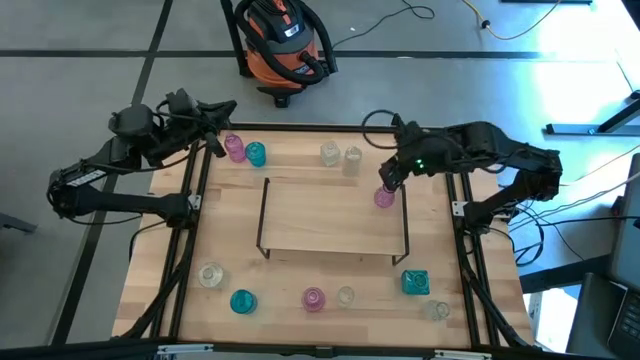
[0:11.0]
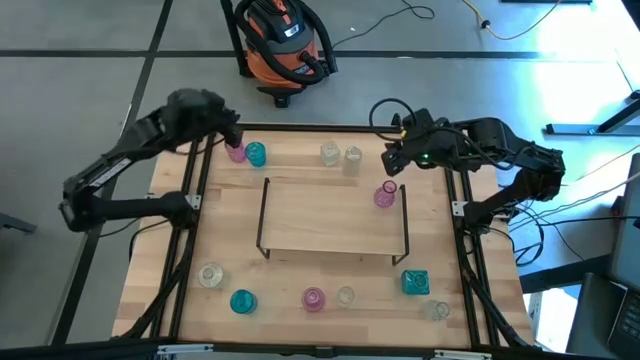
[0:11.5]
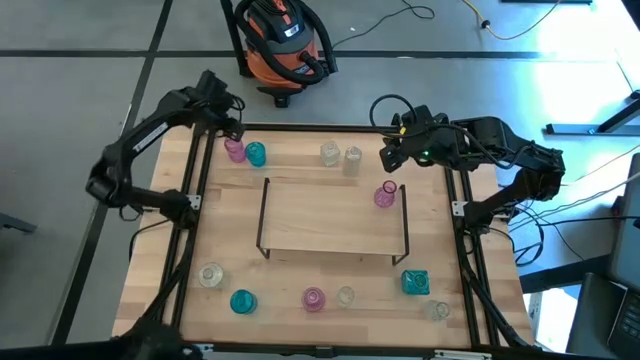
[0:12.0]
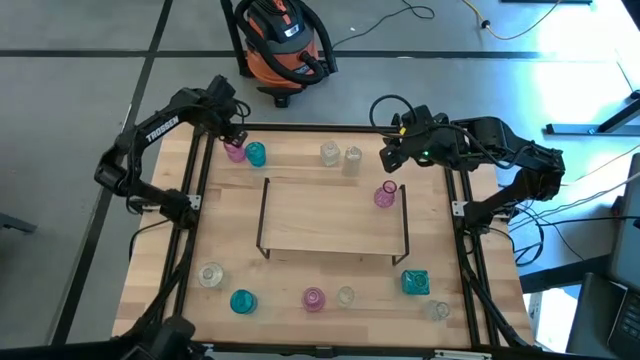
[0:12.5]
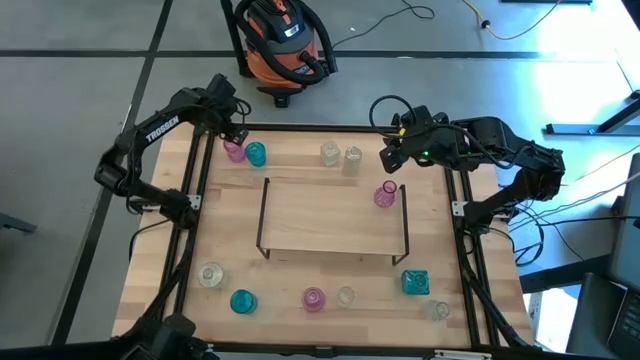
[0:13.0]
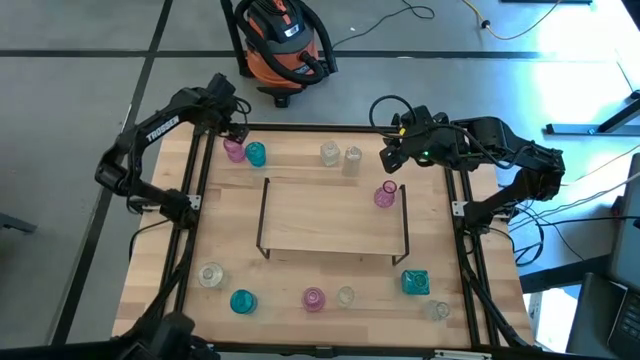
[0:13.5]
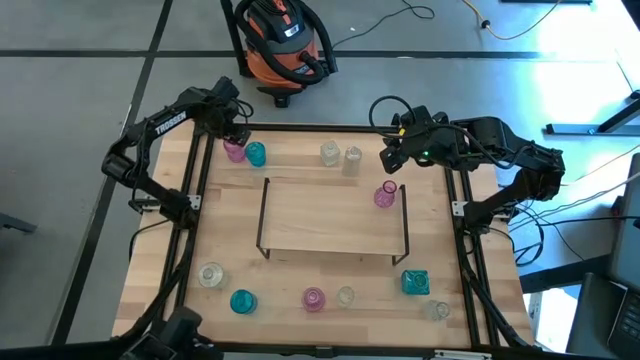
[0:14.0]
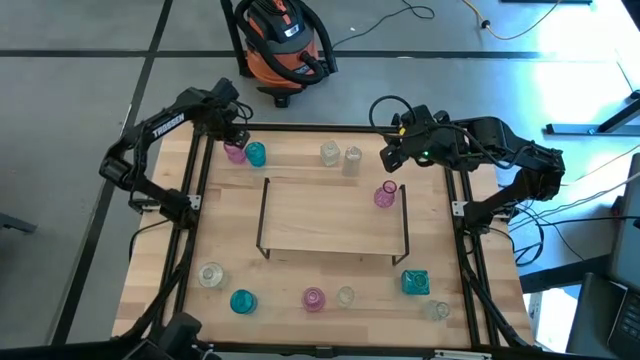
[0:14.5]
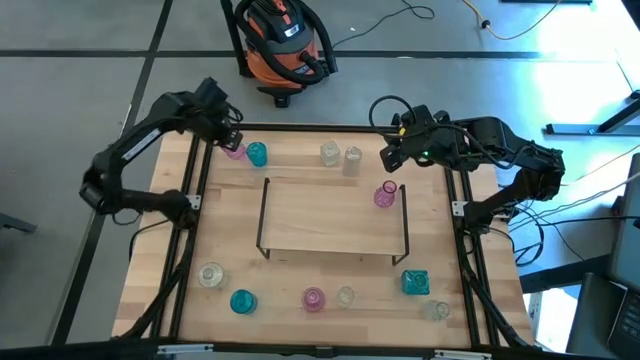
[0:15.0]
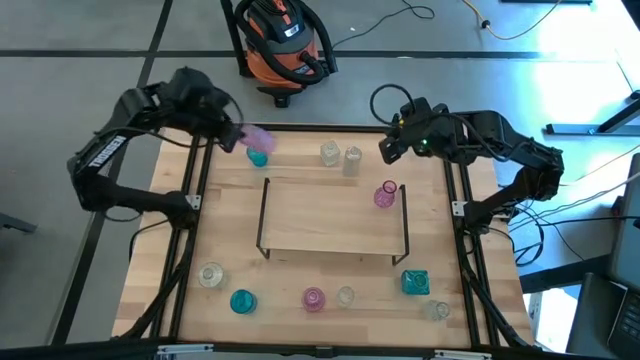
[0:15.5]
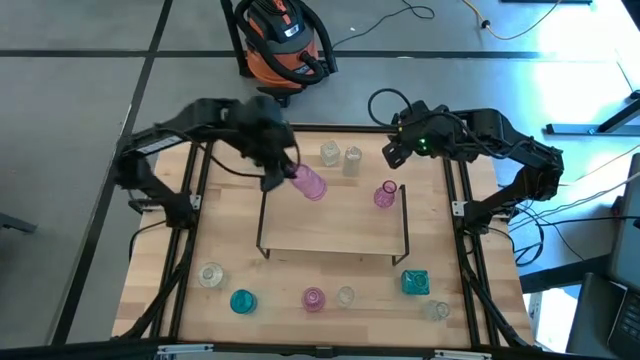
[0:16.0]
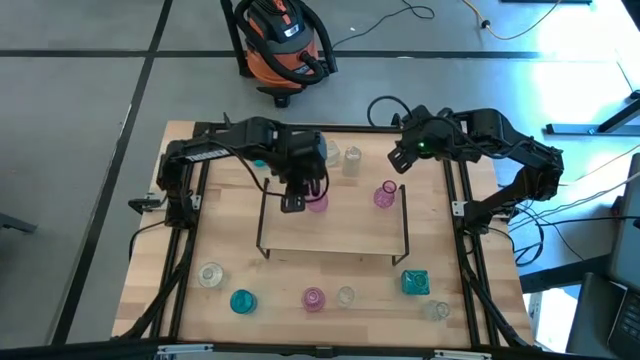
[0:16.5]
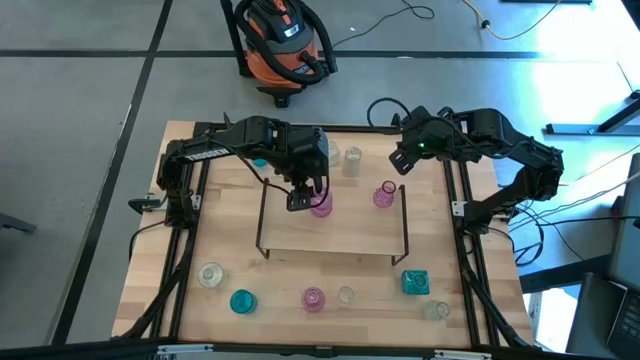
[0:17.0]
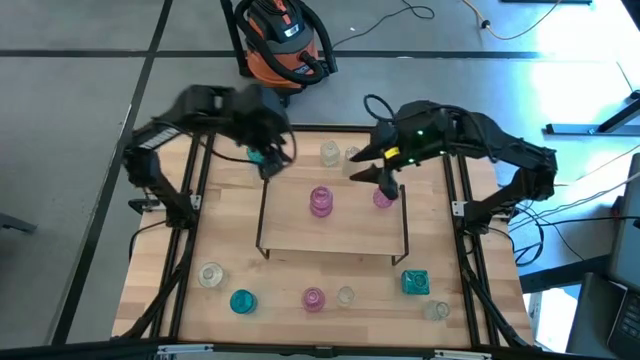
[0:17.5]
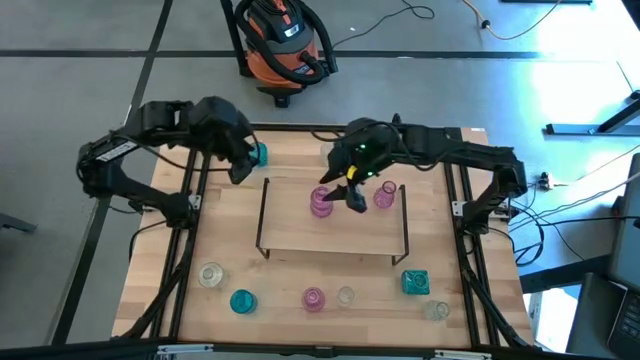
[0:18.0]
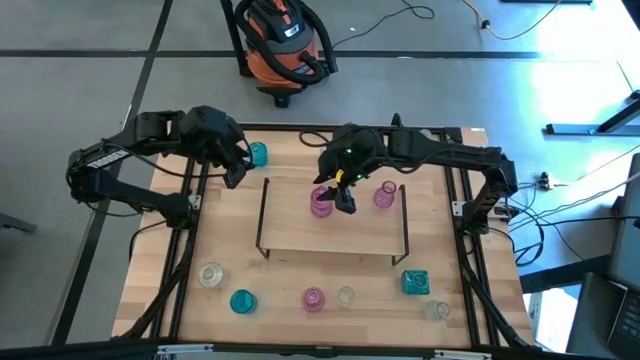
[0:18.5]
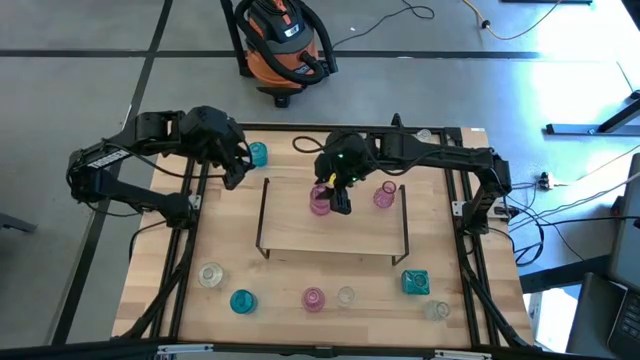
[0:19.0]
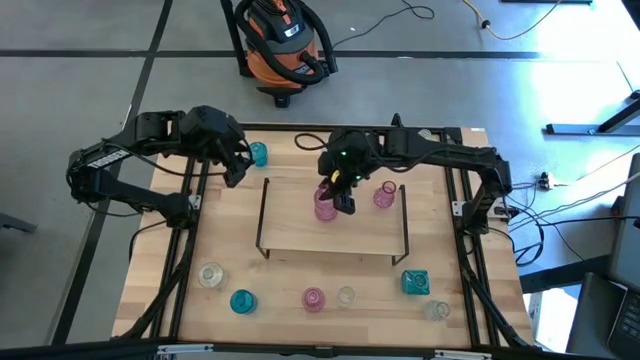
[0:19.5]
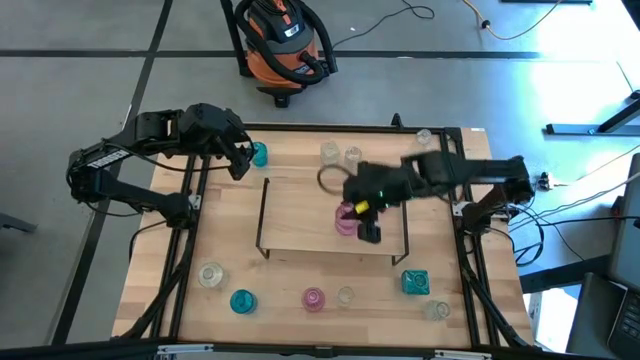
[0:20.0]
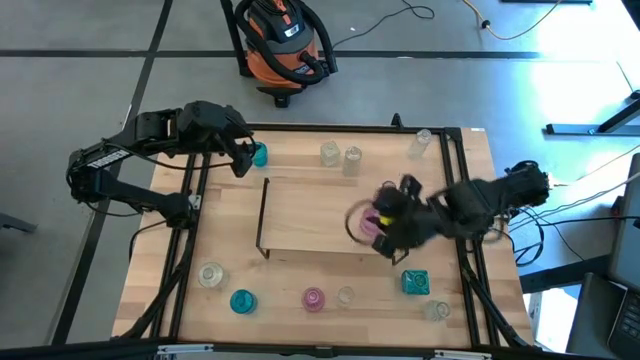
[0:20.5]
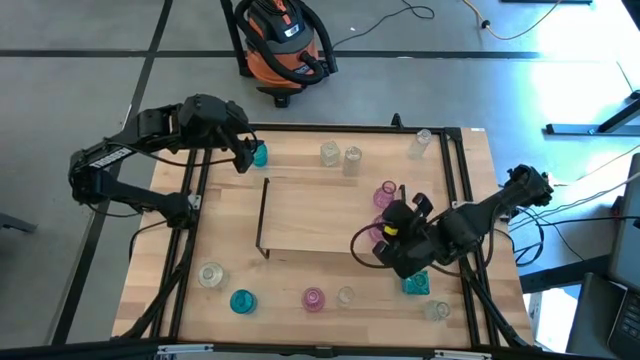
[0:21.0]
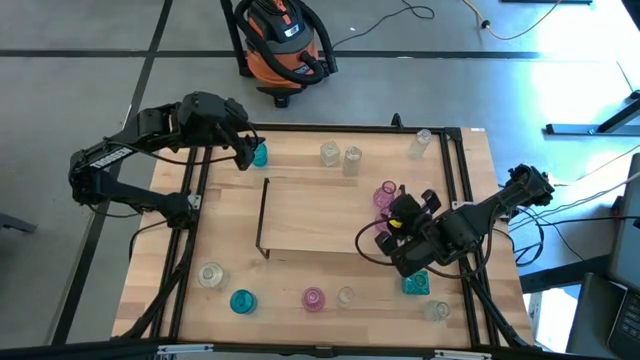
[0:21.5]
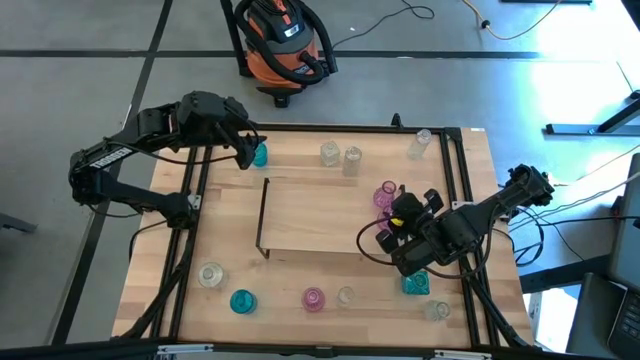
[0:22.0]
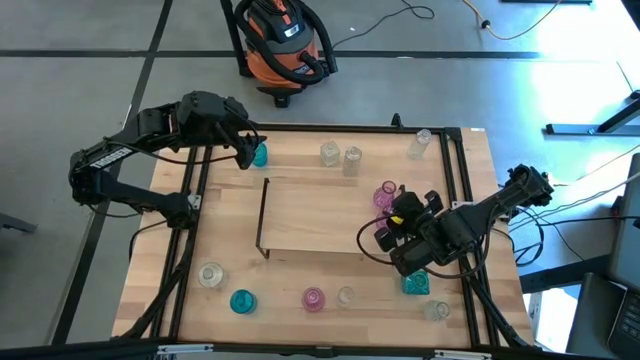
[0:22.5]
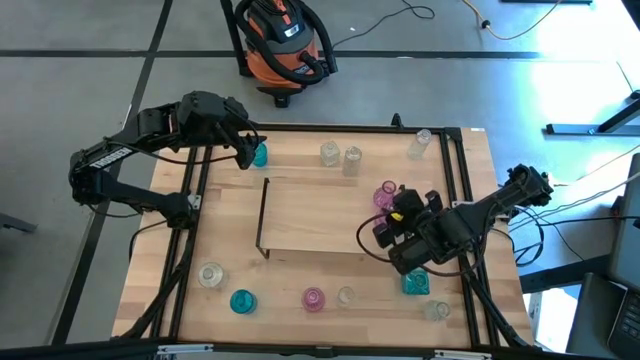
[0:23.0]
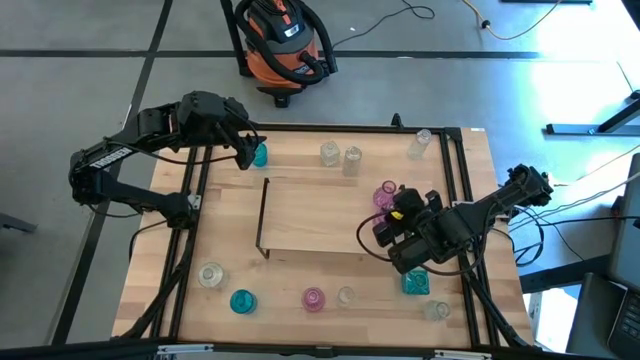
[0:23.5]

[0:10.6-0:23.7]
Task: sort vases onto shelf
Put the top pink vase on the shelf

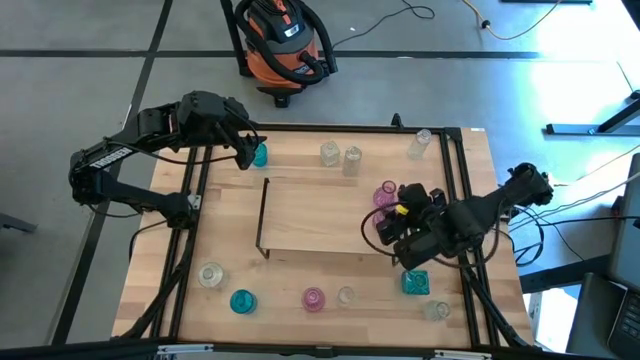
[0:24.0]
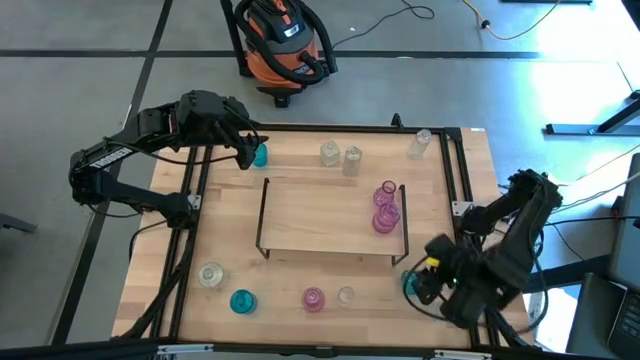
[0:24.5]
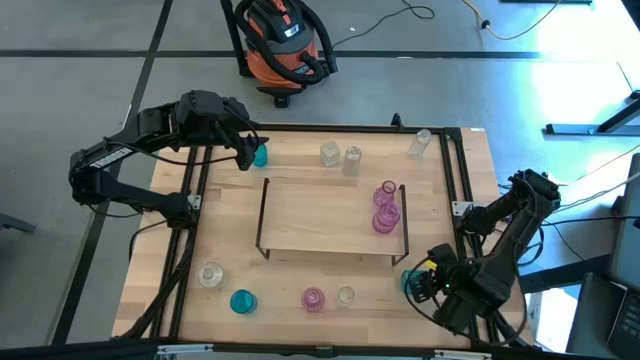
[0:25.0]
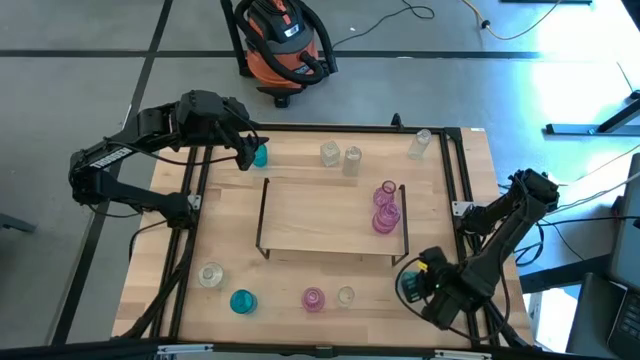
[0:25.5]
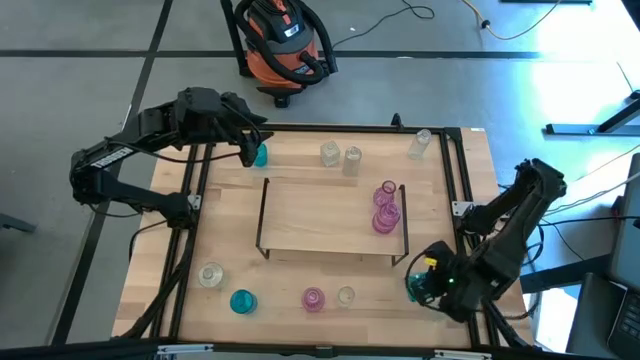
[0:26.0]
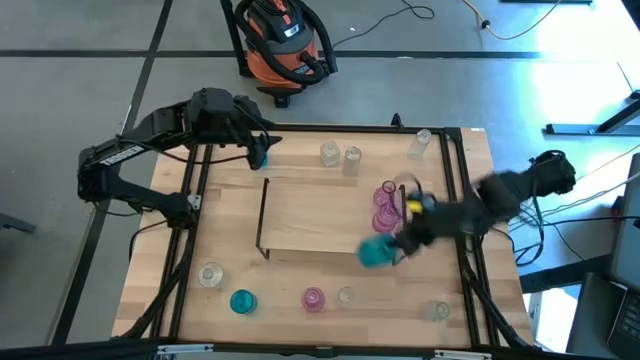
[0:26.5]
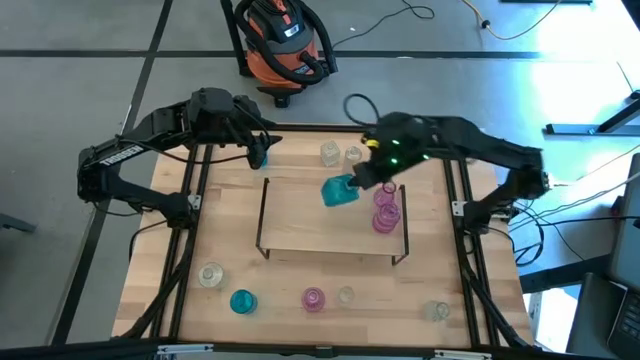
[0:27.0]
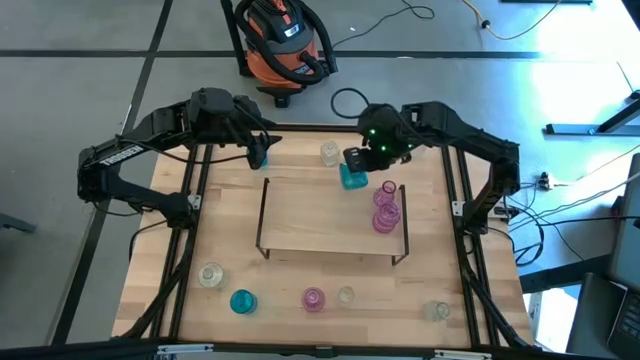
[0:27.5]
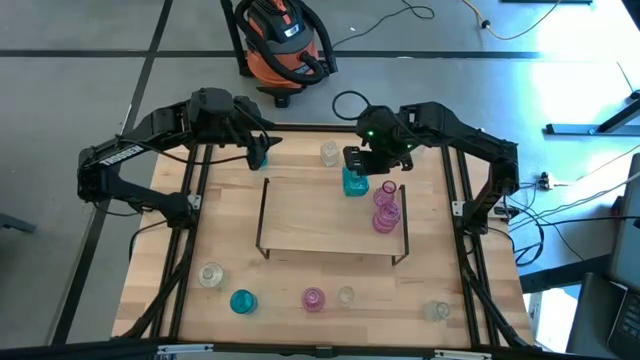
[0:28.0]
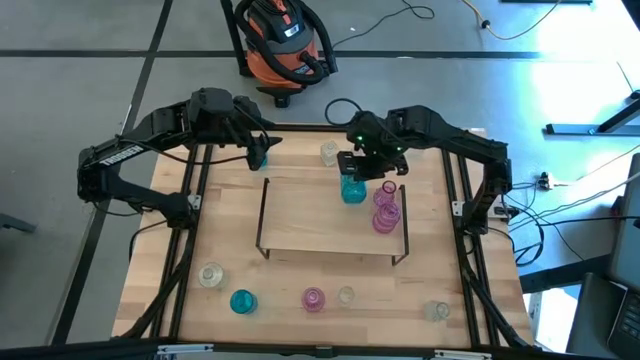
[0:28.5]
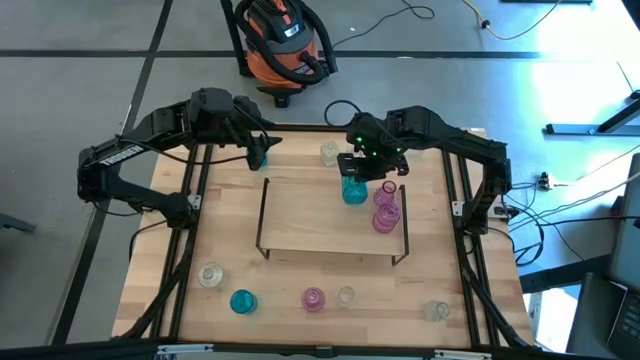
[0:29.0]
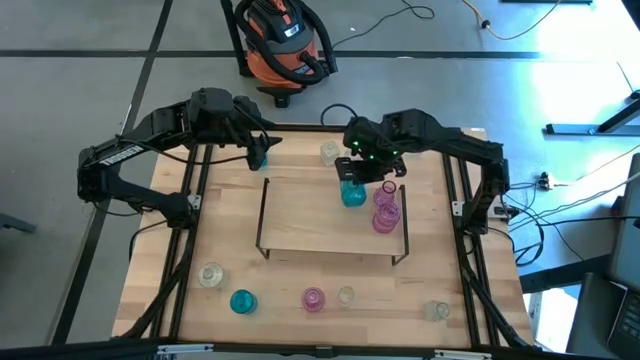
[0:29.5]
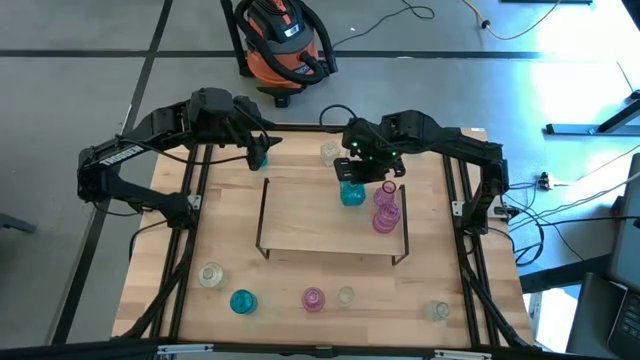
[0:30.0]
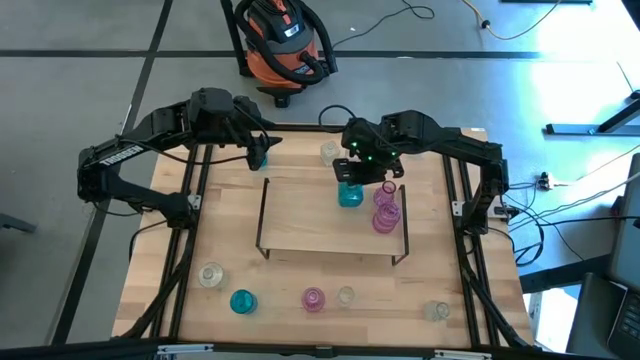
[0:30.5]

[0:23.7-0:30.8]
Put the bottom right blue vase on the shelf

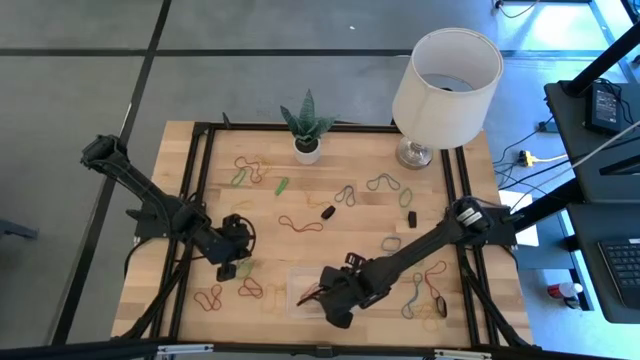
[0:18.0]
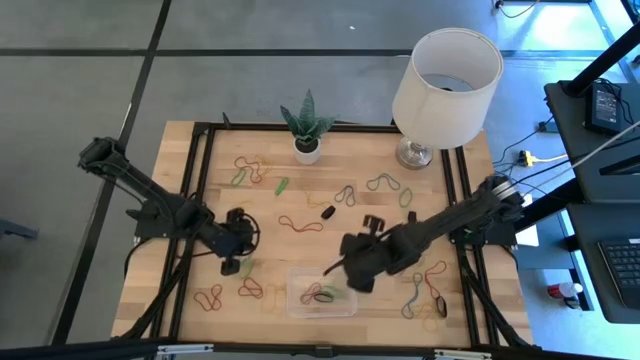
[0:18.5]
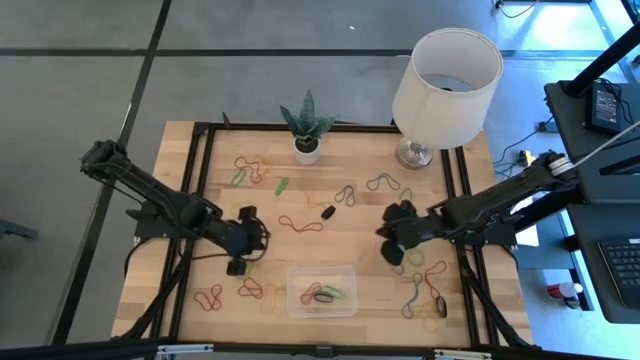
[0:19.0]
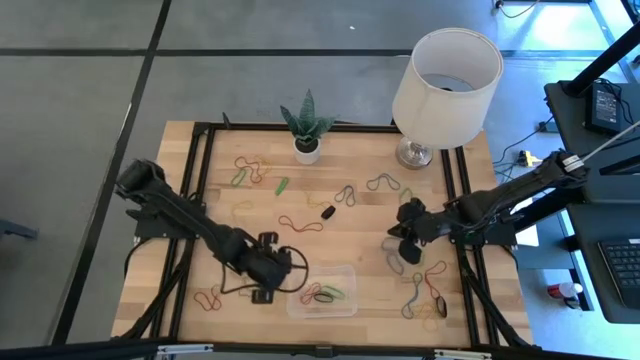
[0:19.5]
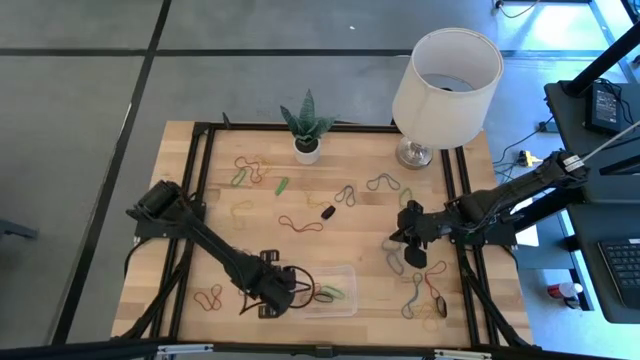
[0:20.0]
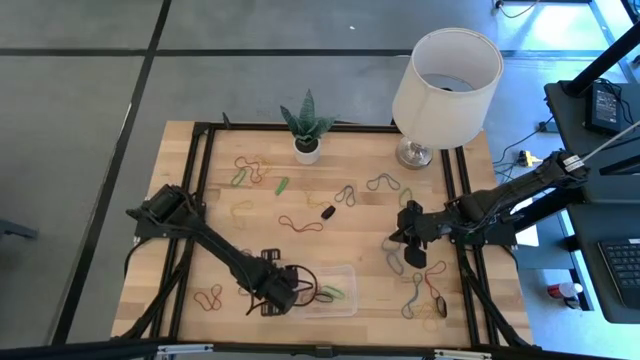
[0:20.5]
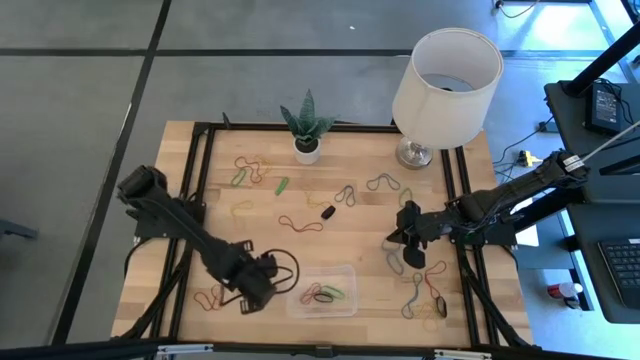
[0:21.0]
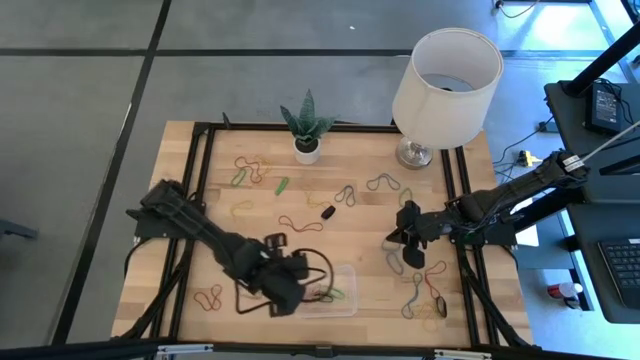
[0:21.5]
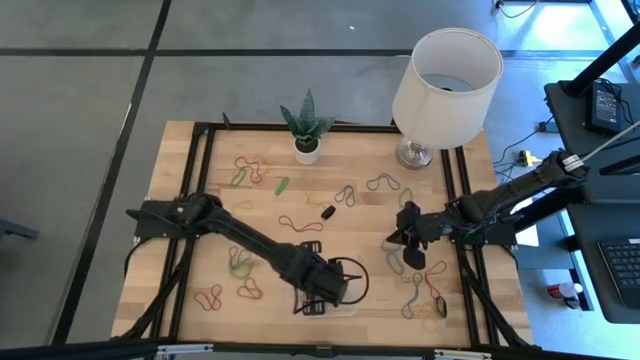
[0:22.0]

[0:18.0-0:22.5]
Task: Pick and place rubber bands into bin
Put the yellow rubber band into the transparent bin
